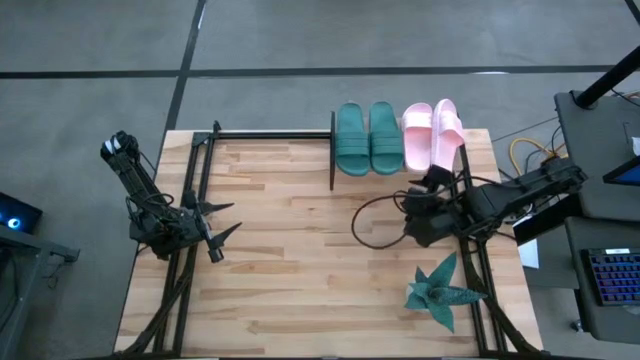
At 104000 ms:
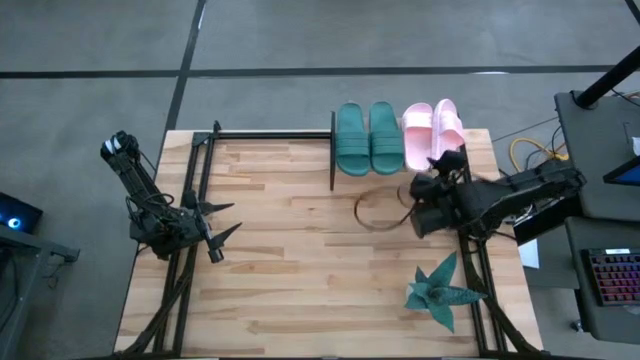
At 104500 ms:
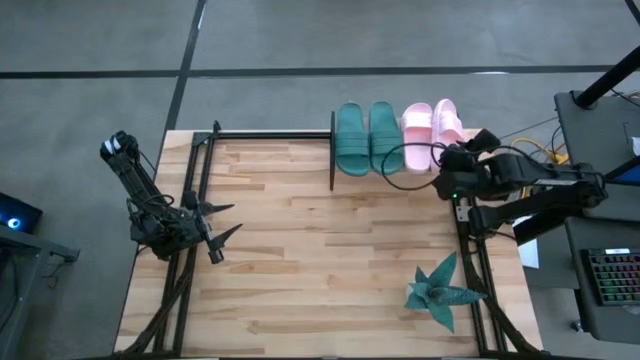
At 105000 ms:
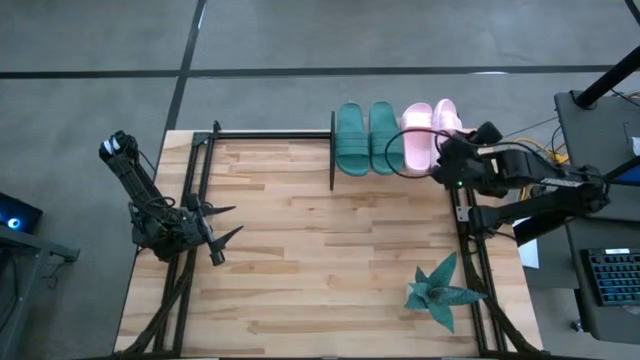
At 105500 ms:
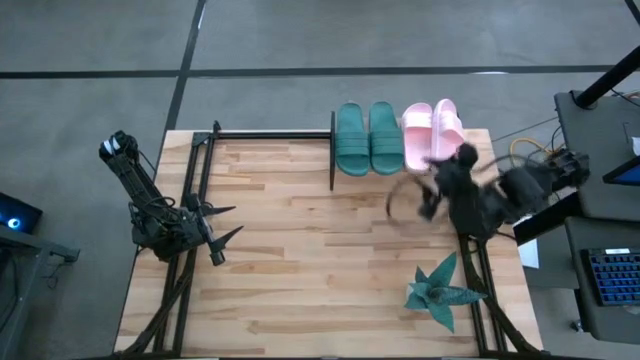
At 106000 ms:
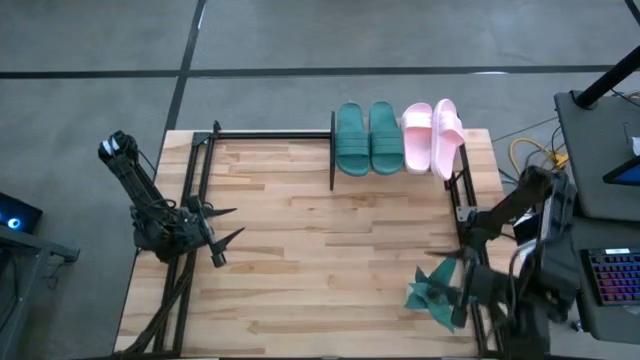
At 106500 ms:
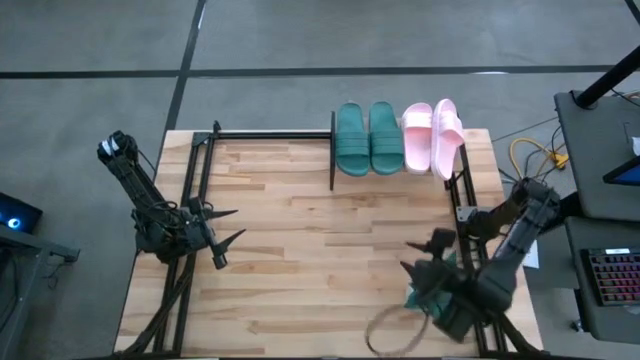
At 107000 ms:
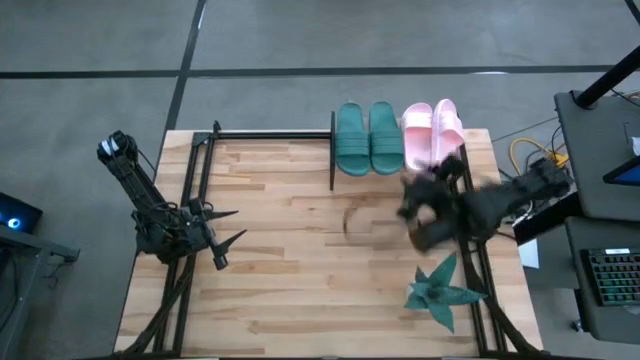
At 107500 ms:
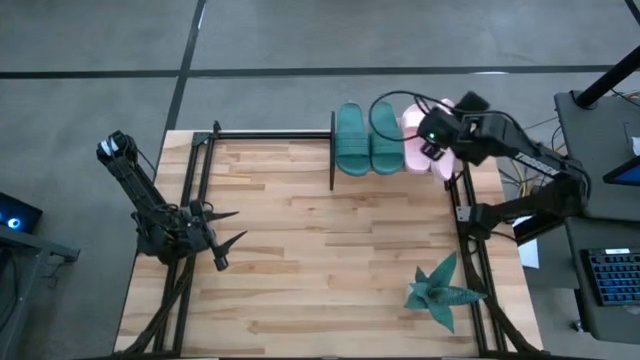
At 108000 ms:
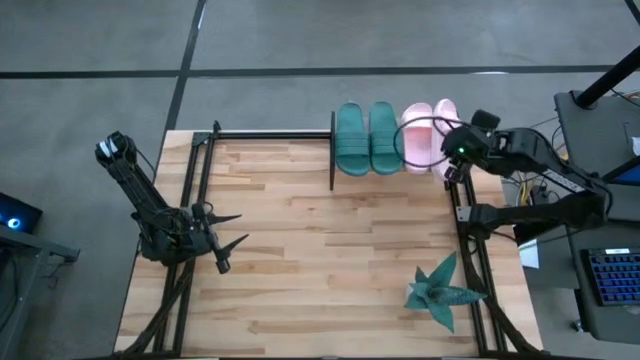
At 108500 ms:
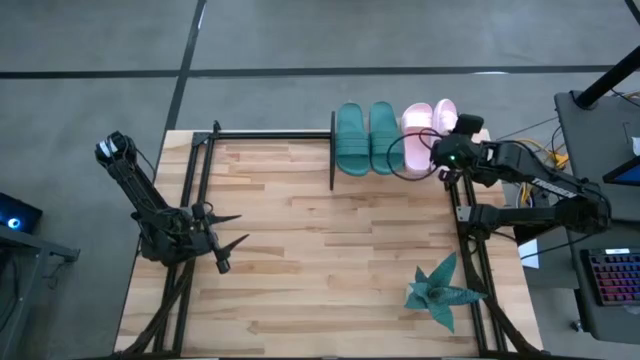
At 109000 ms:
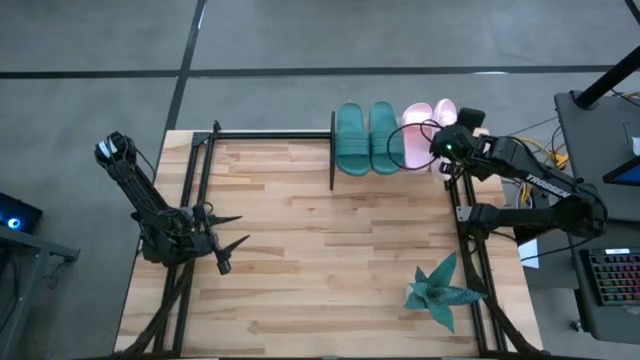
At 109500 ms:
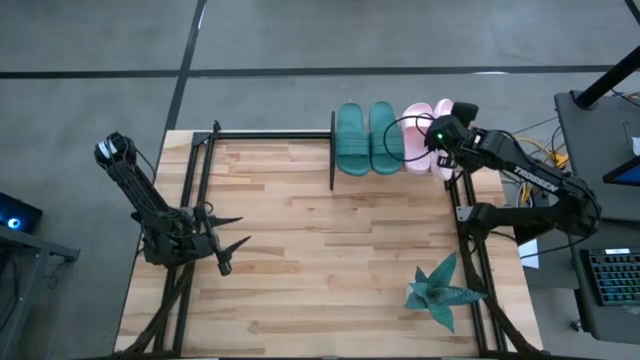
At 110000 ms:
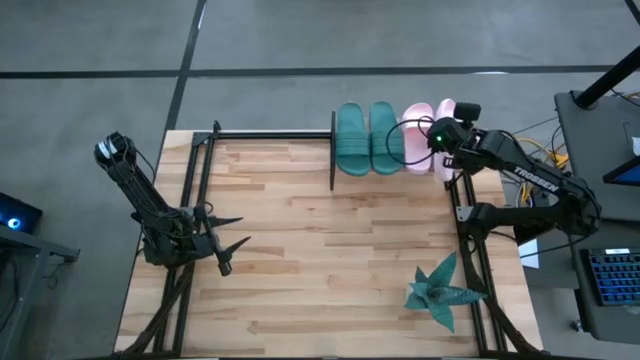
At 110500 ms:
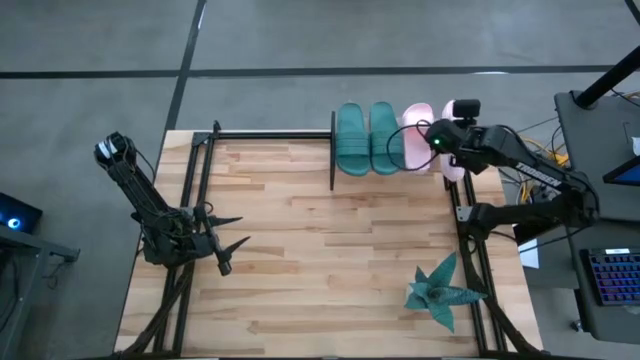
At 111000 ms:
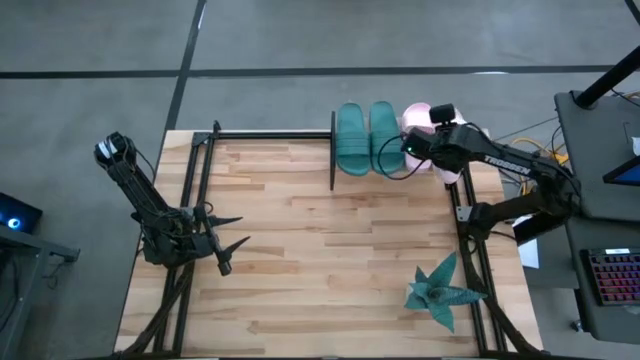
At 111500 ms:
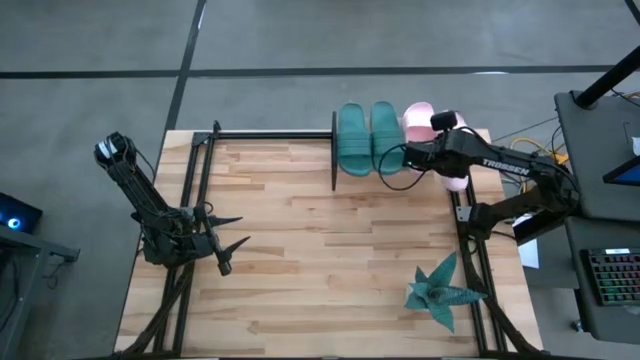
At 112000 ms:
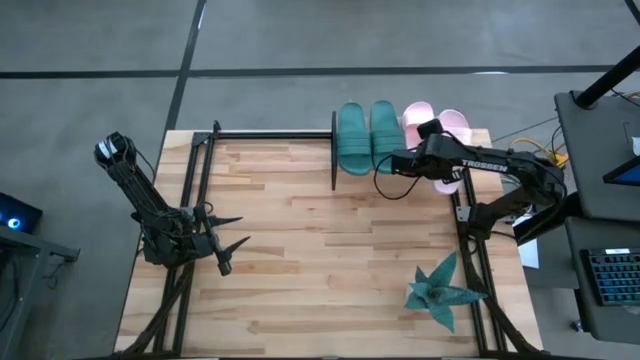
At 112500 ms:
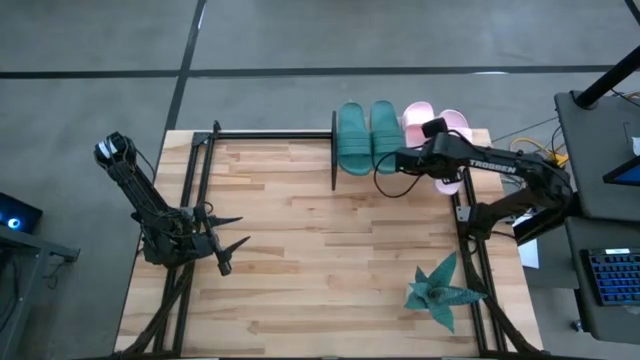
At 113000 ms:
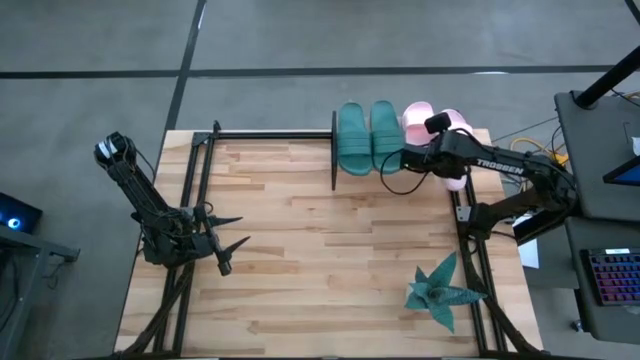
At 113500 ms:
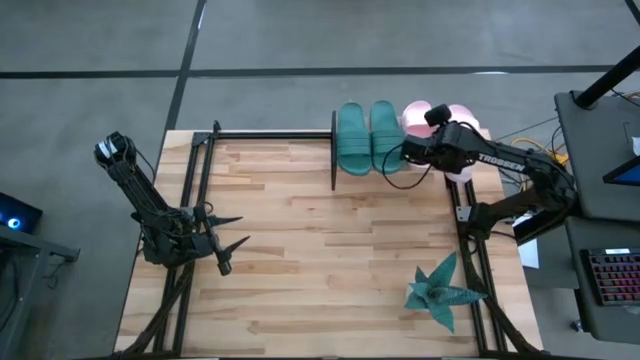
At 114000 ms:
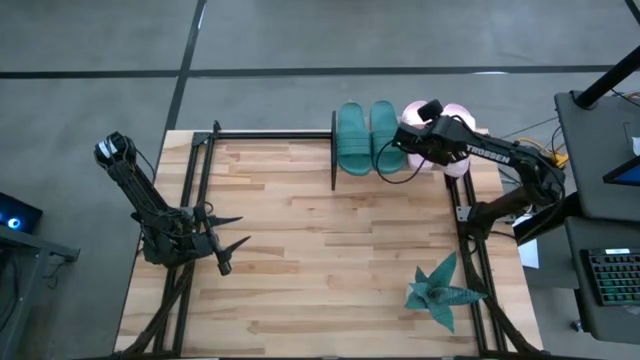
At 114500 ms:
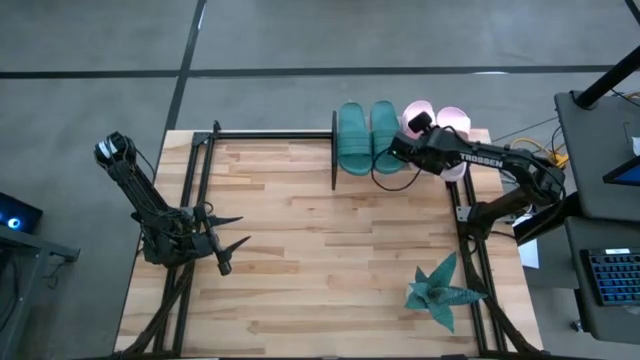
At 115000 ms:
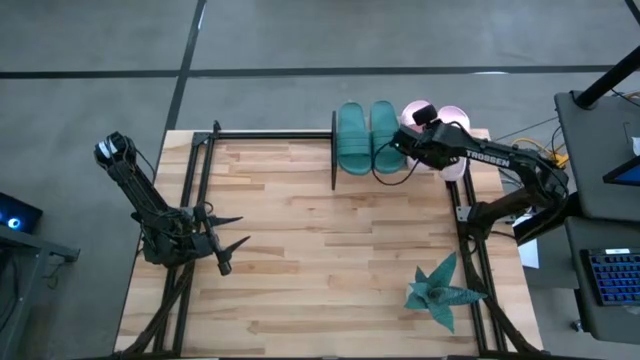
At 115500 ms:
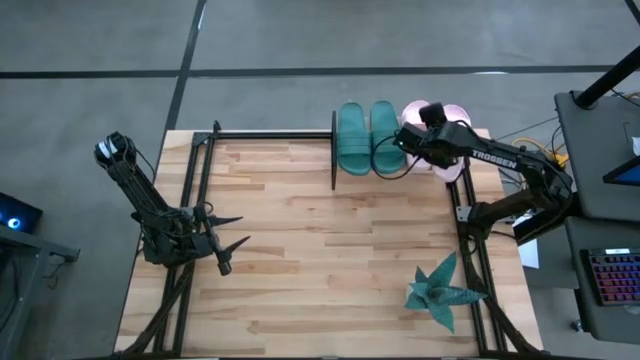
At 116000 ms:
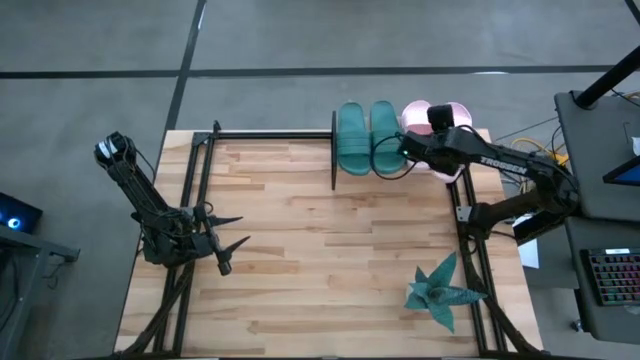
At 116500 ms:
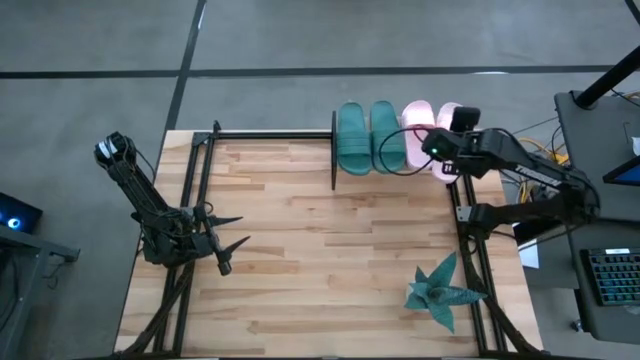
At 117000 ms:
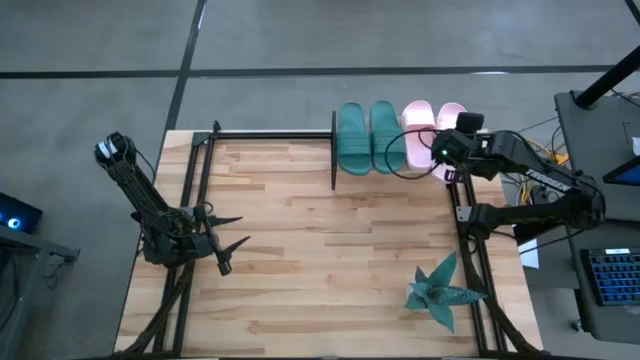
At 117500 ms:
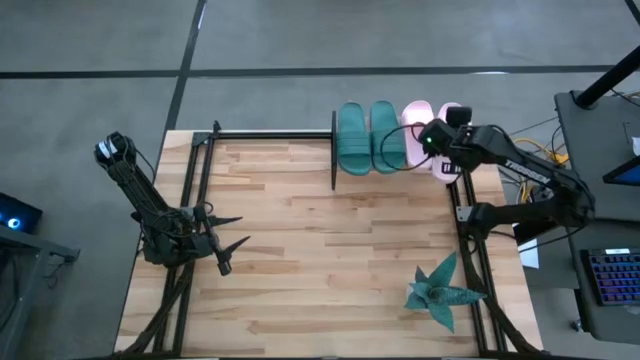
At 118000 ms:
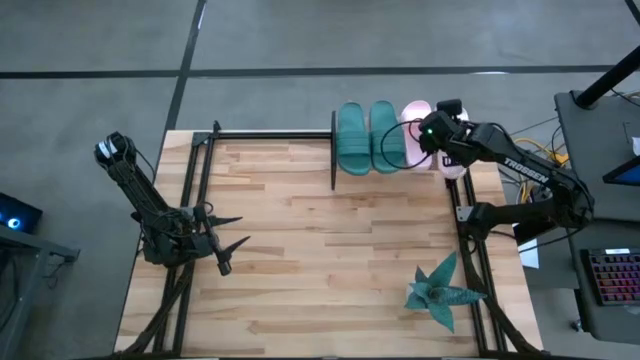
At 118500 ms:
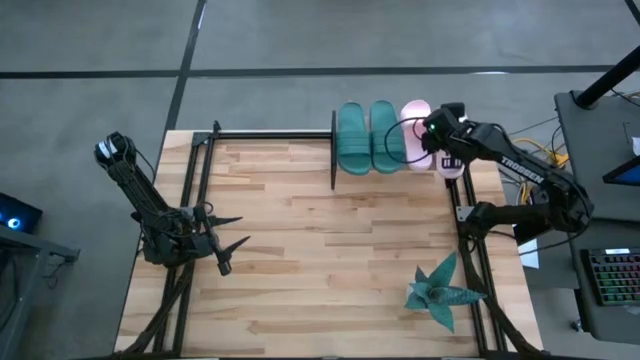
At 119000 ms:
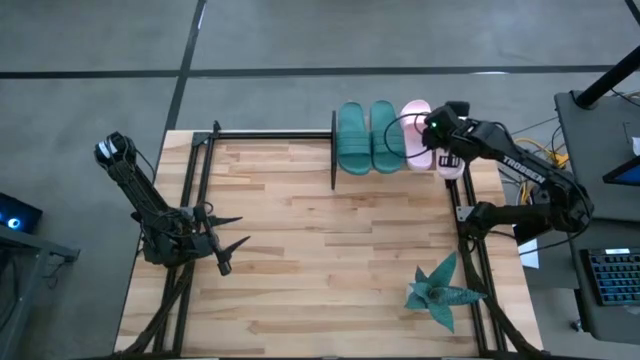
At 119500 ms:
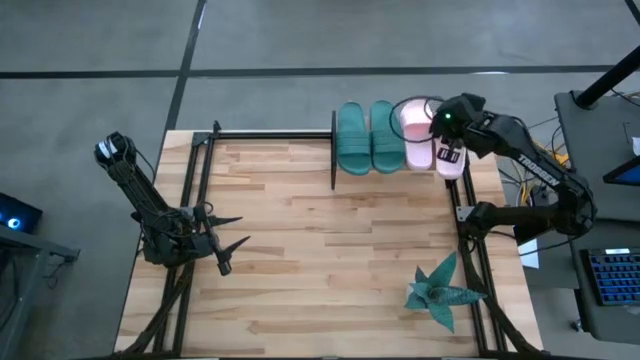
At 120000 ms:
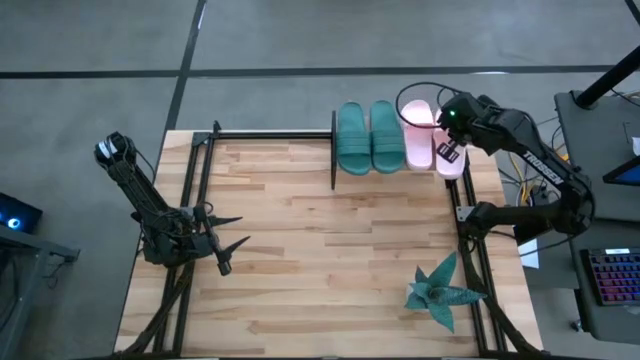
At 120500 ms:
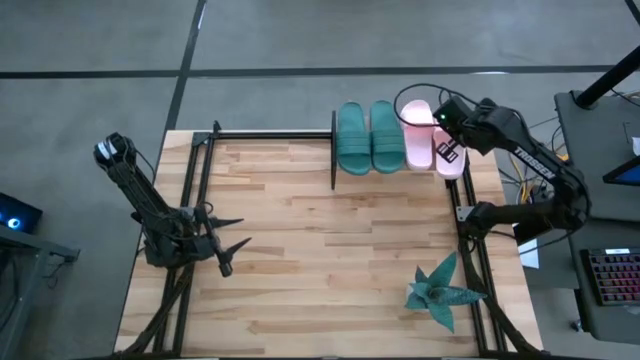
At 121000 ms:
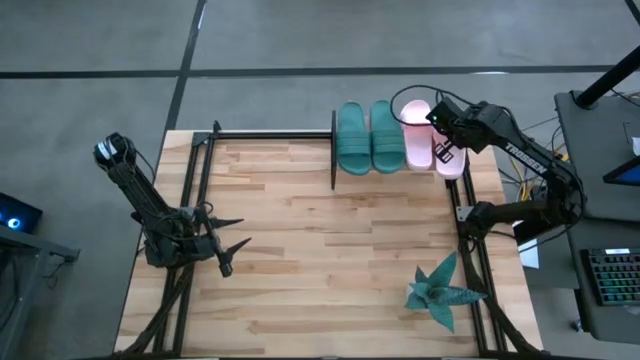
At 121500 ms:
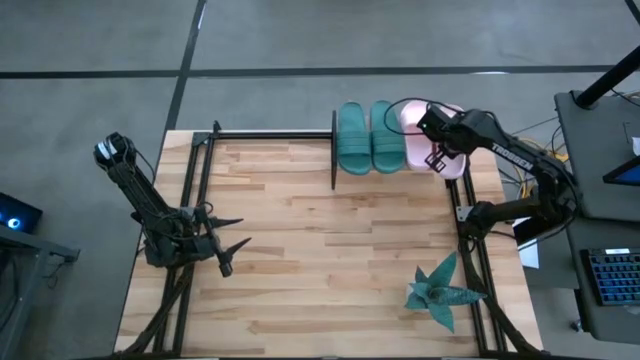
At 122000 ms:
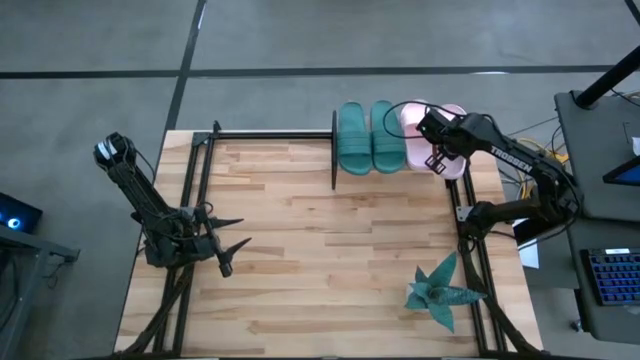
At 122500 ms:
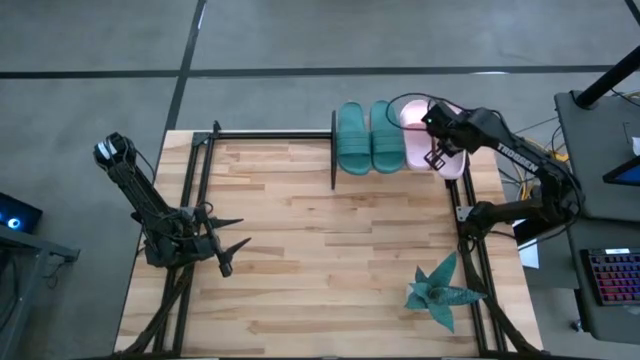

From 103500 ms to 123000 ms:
Task: Pick and place slides into the shelf
Put the pink slipper on the shelf

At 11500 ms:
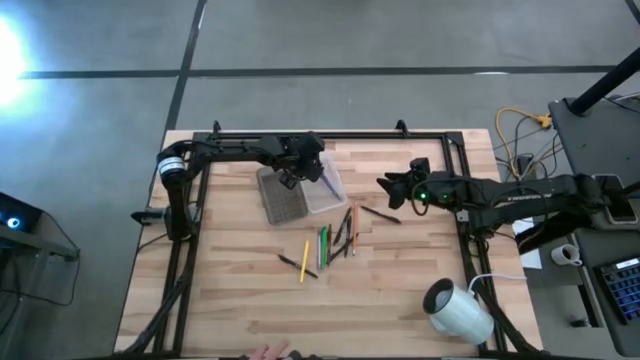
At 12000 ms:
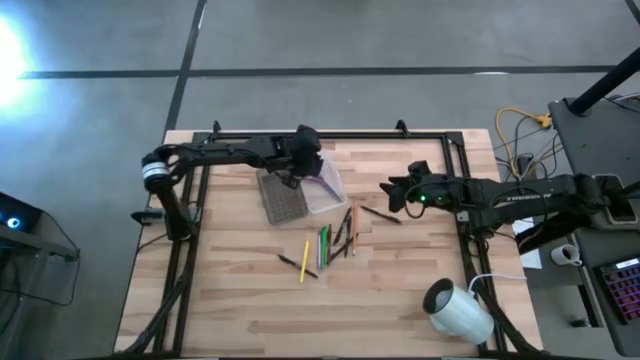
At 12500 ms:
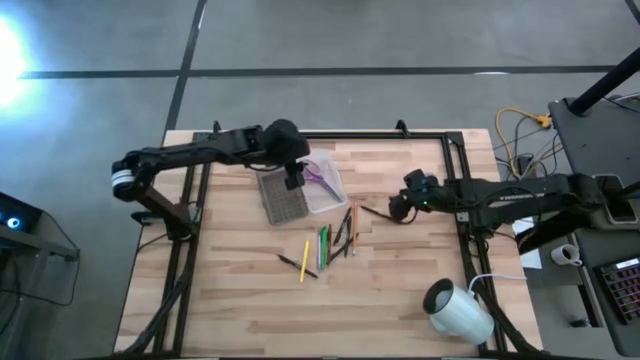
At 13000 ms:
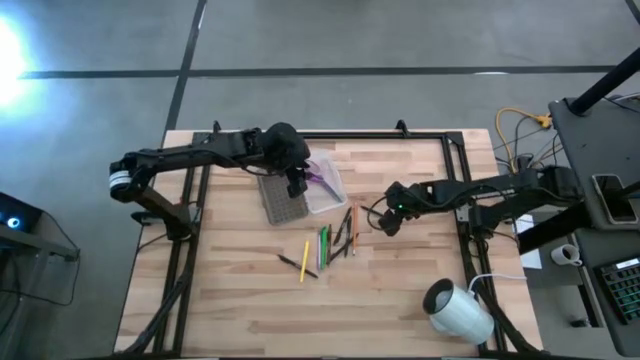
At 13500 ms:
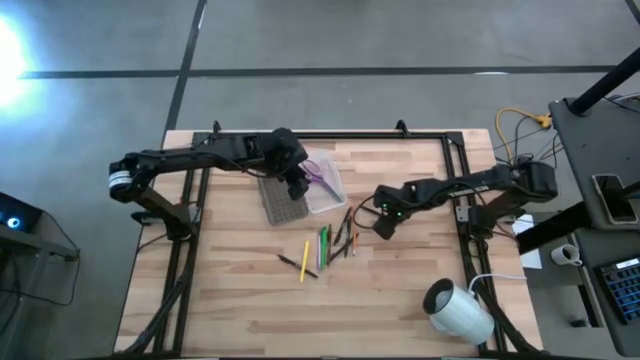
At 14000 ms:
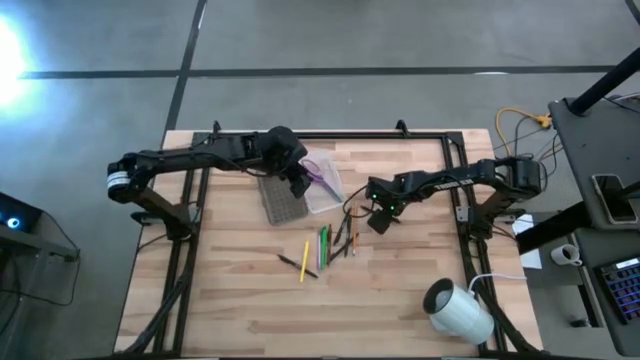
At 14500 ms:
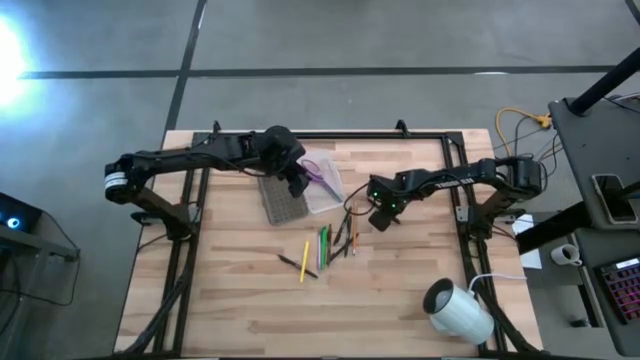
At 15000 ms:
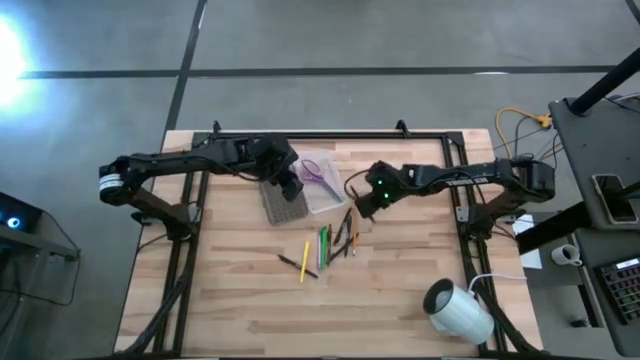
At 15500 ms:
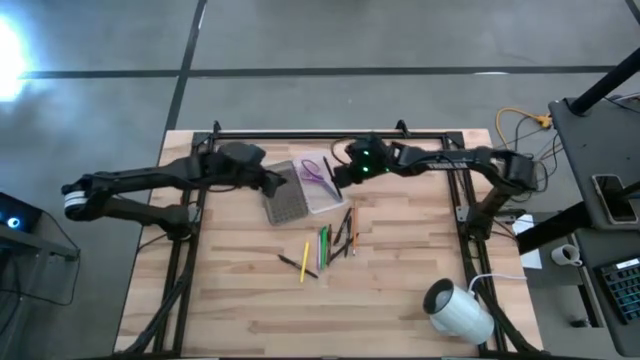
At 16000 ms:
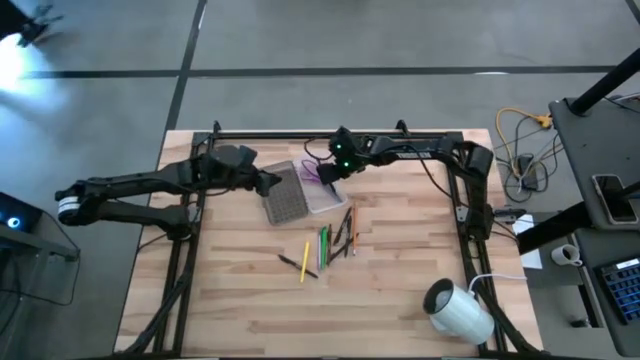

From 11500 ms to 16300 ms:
Task: Pick & place school supplies into a supply box
Put the black pen into the supply box
